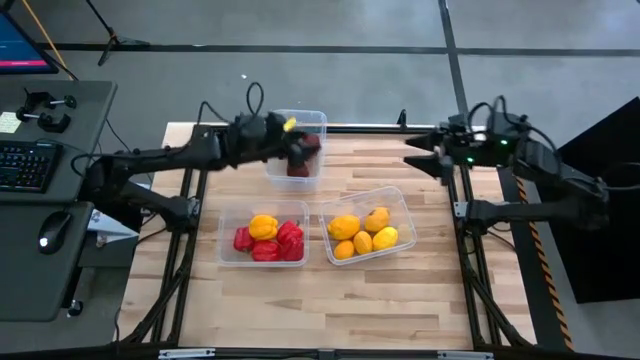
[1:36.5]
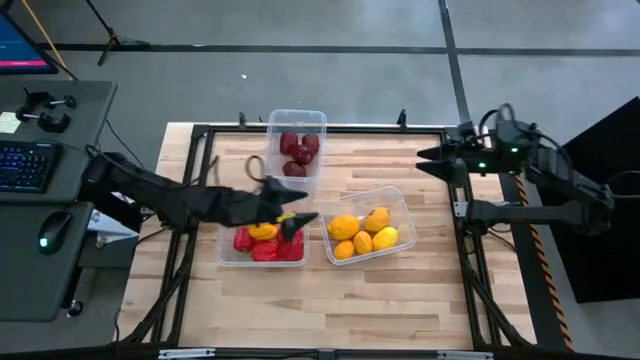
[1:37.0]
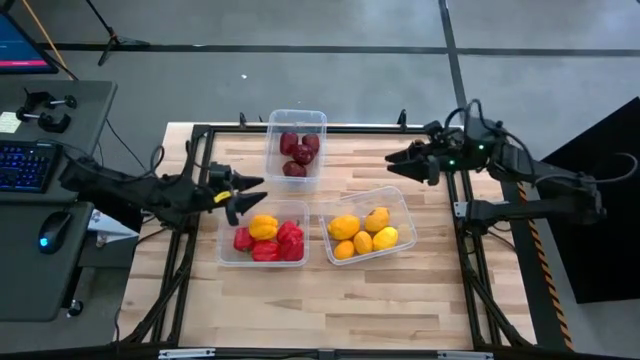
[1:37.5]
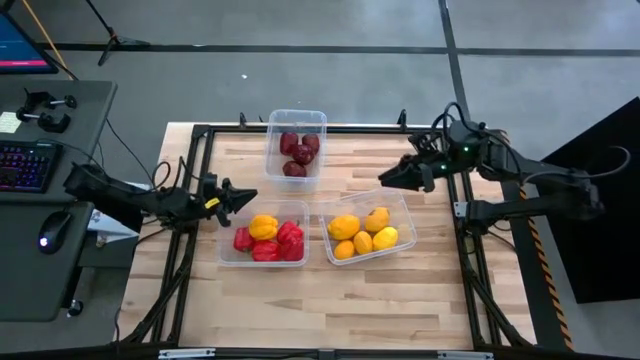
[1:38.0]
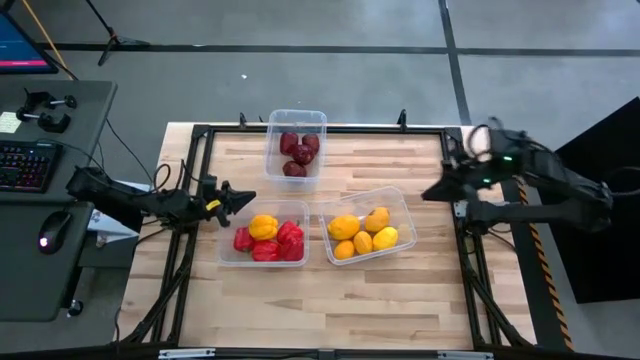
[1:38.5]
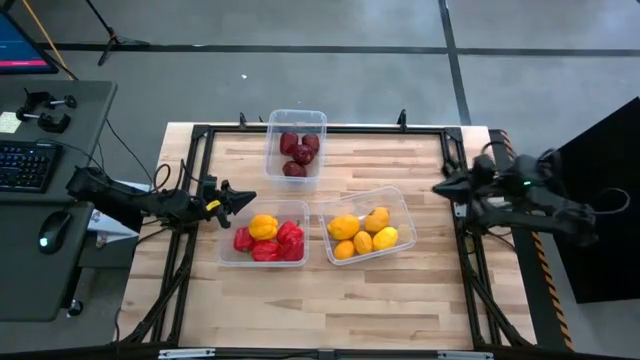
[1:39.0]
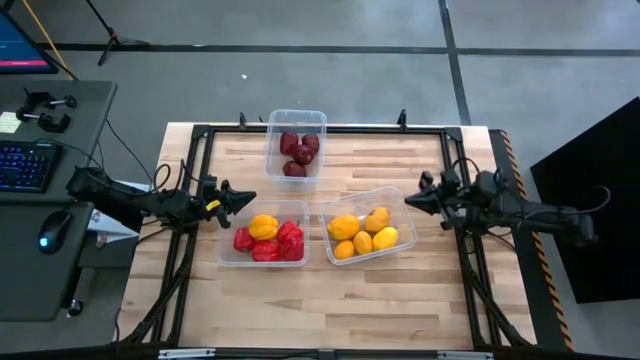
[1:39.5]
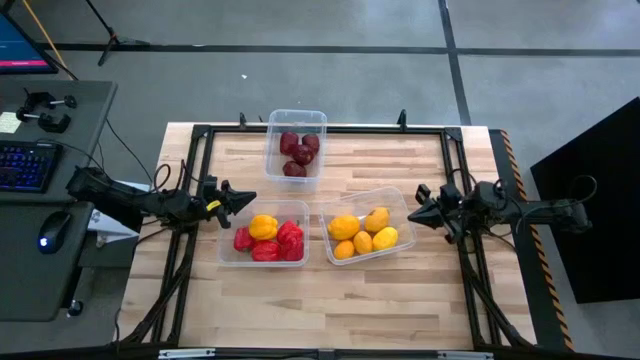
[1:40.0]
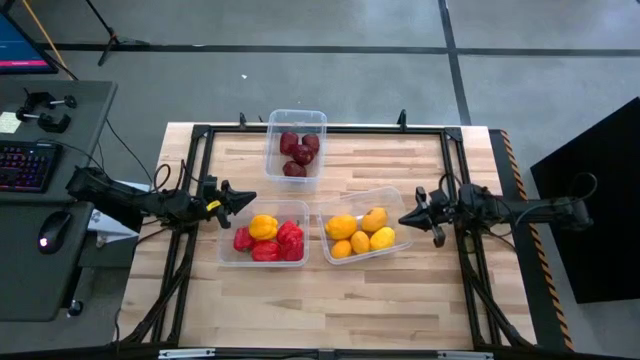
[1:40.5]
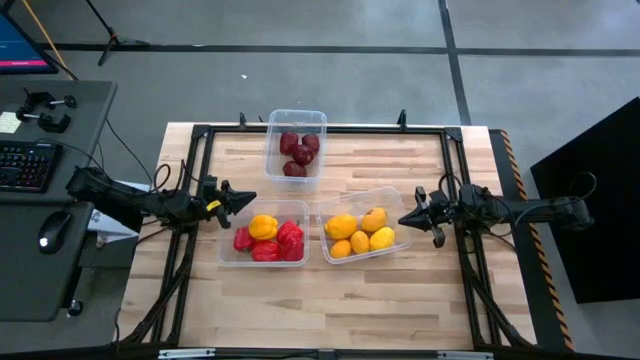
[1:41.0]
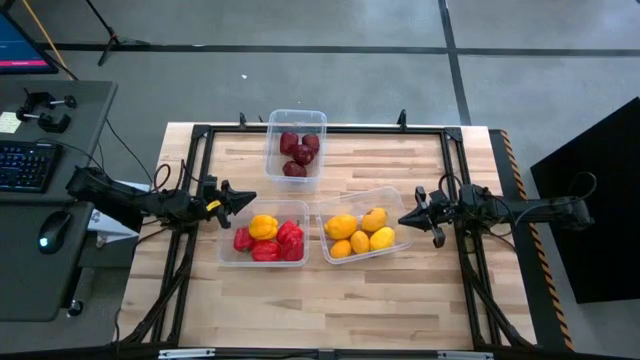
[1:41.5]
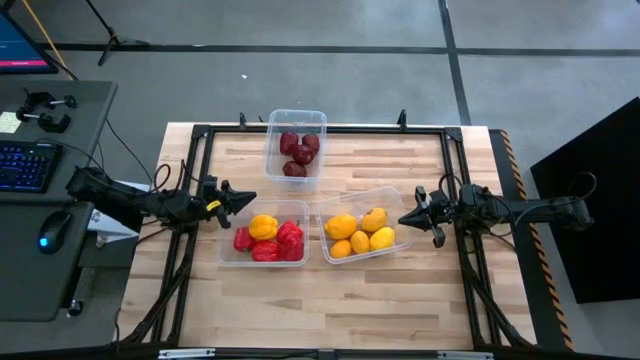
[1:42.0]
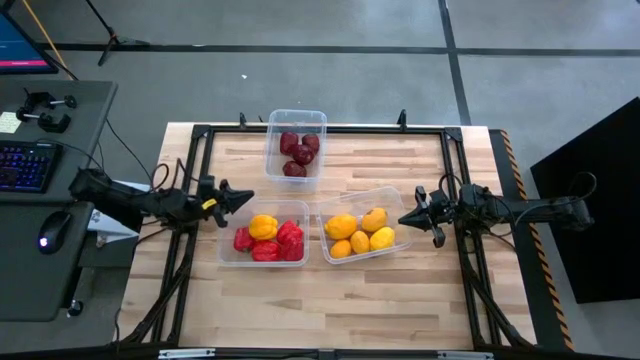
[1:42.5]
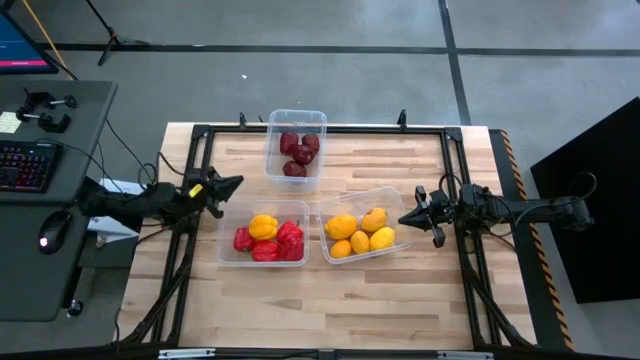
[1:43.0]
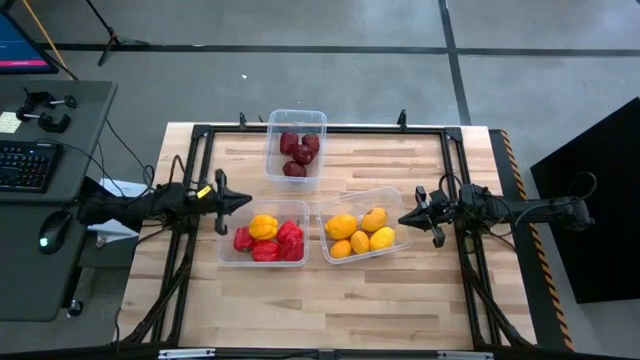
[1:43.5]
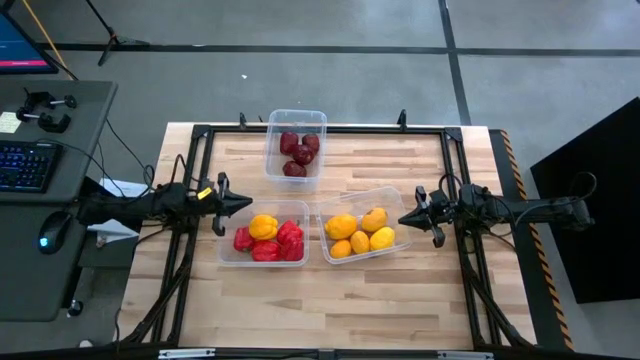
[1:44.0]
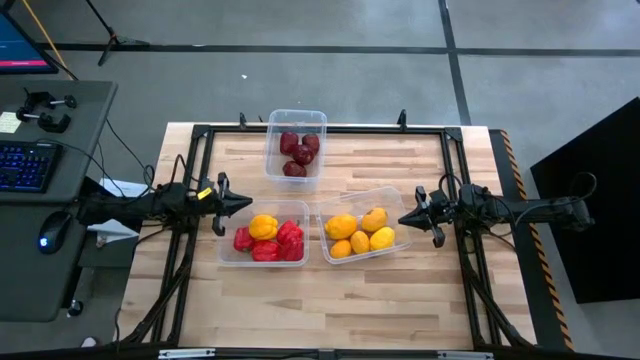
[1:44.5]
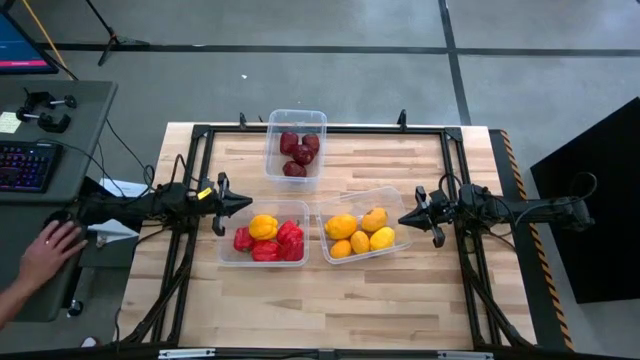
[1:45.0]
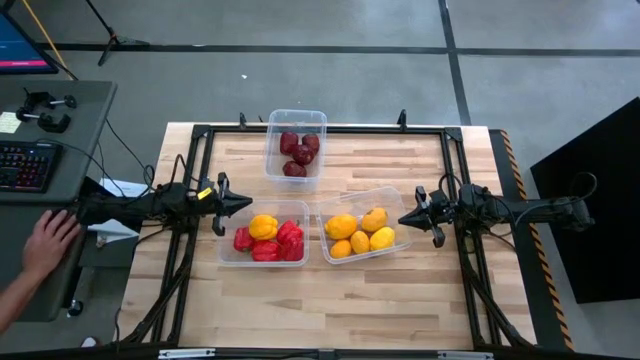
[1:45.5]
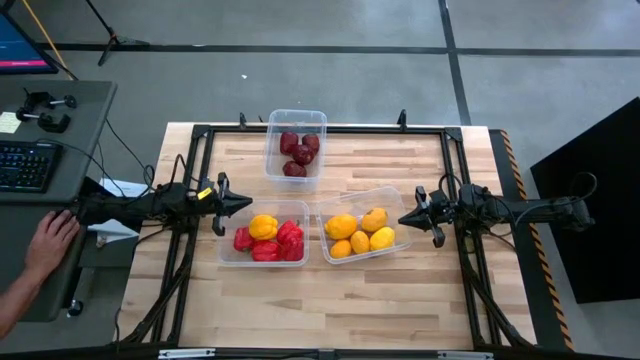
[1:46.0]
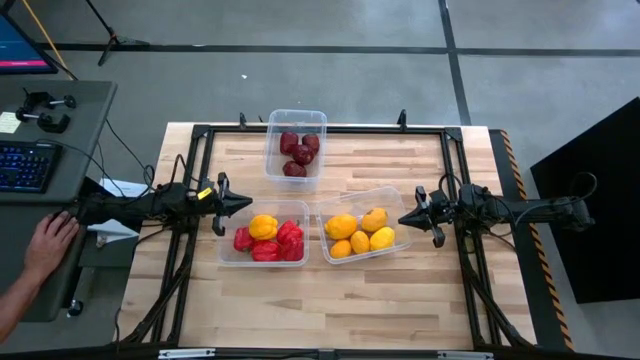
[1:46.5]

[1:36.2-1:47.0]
Task: Sort produce into baskets
Return to Home Position

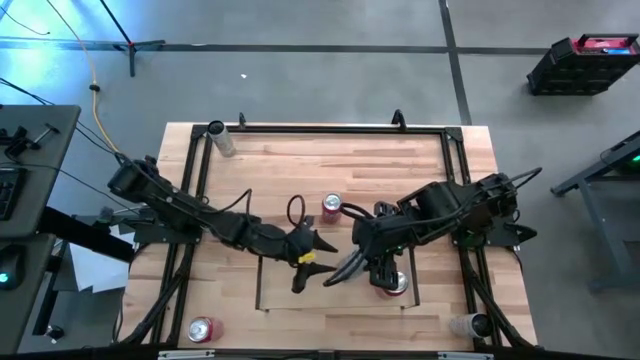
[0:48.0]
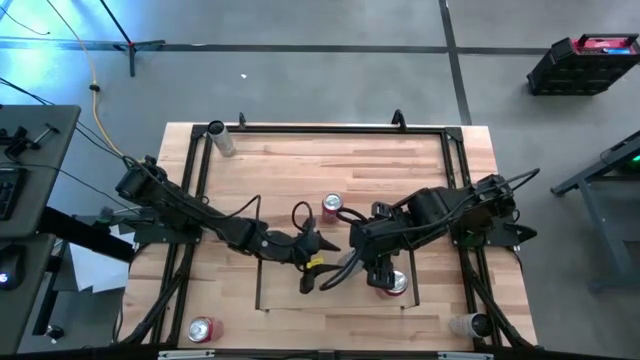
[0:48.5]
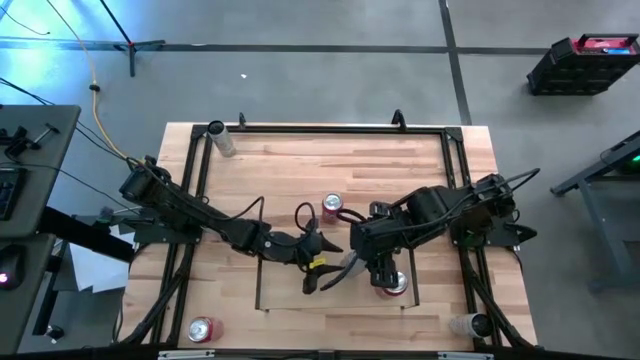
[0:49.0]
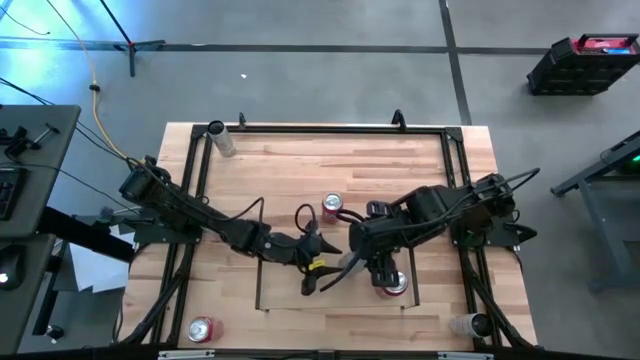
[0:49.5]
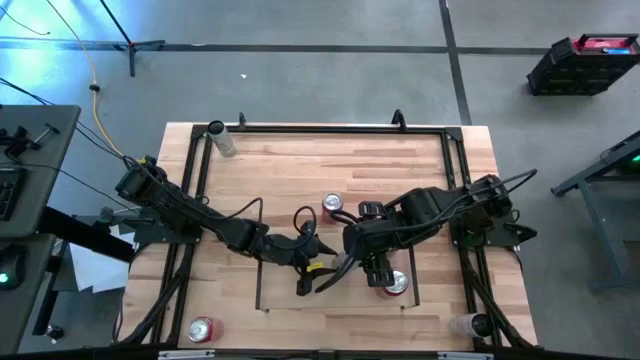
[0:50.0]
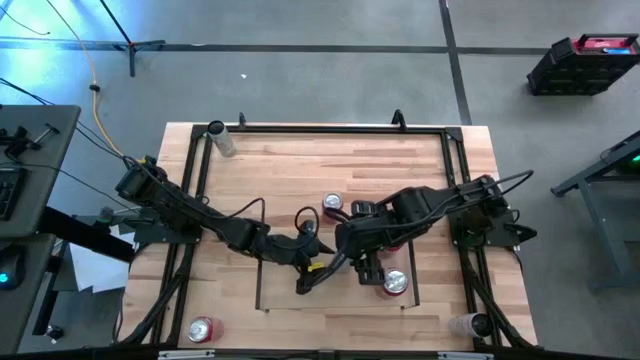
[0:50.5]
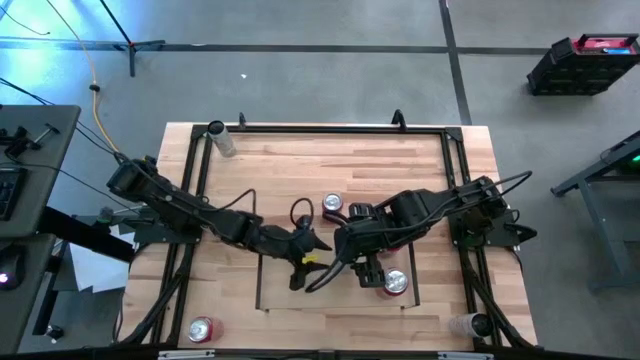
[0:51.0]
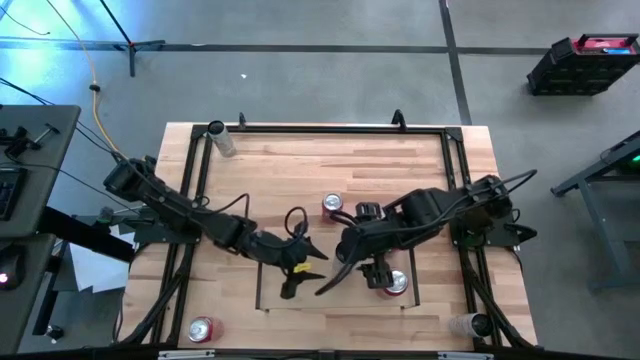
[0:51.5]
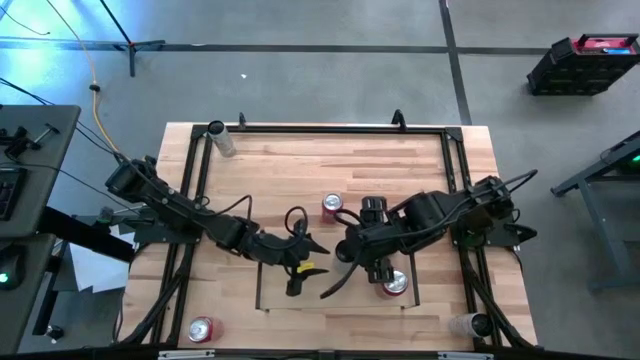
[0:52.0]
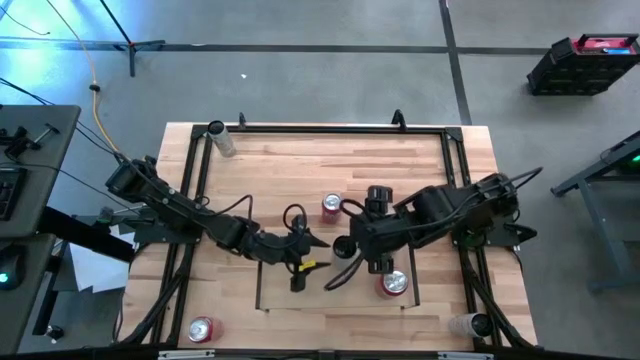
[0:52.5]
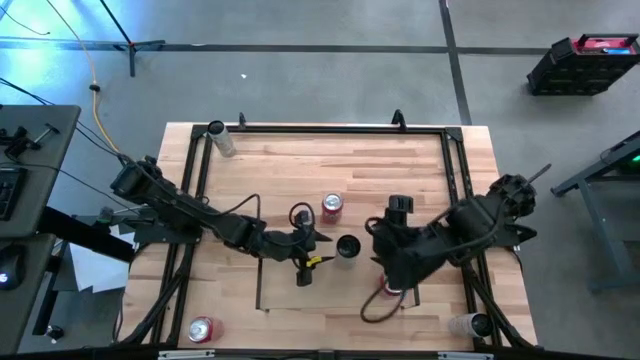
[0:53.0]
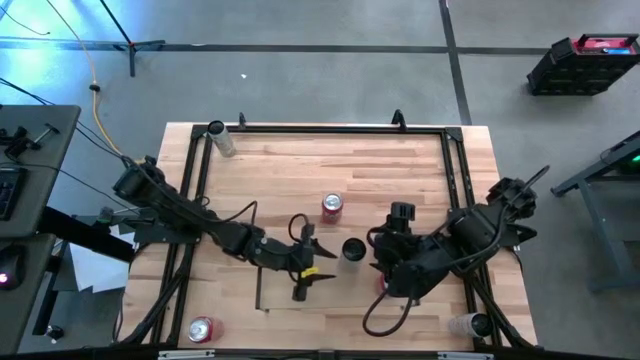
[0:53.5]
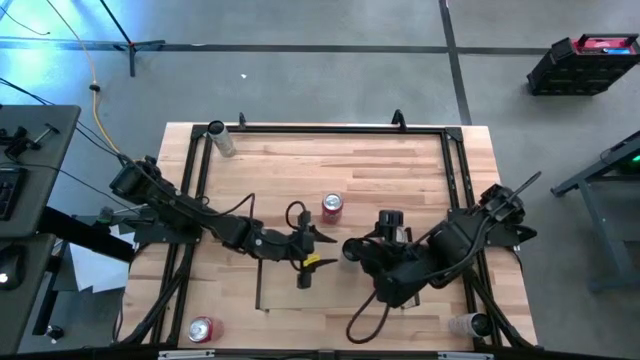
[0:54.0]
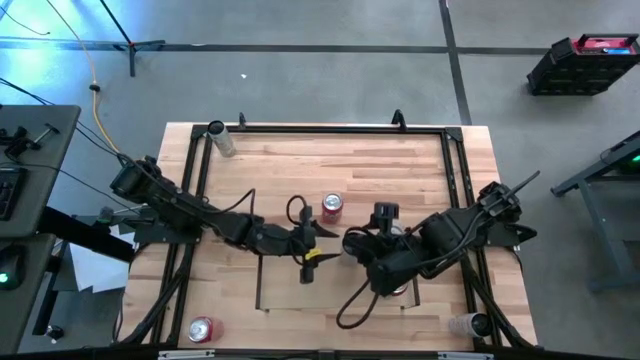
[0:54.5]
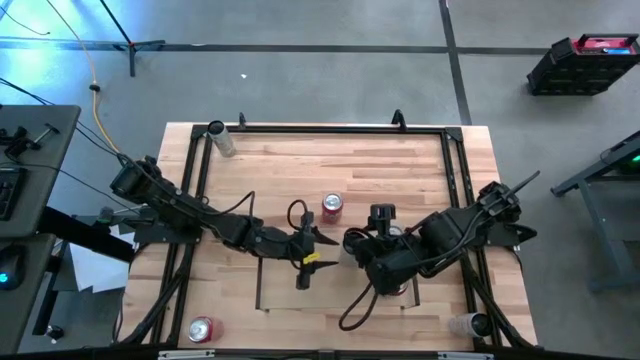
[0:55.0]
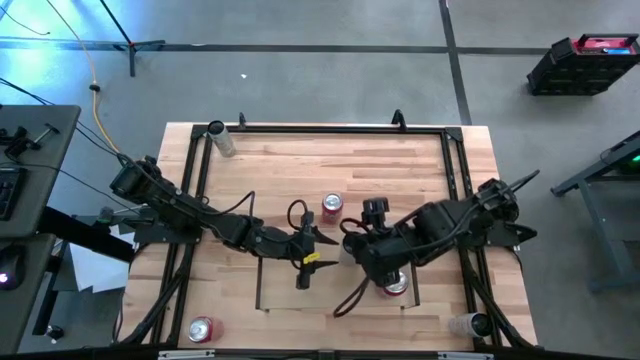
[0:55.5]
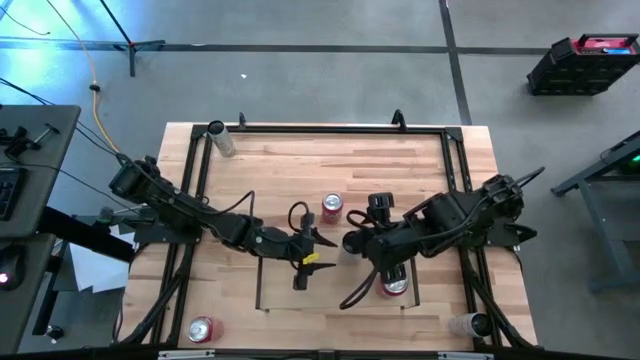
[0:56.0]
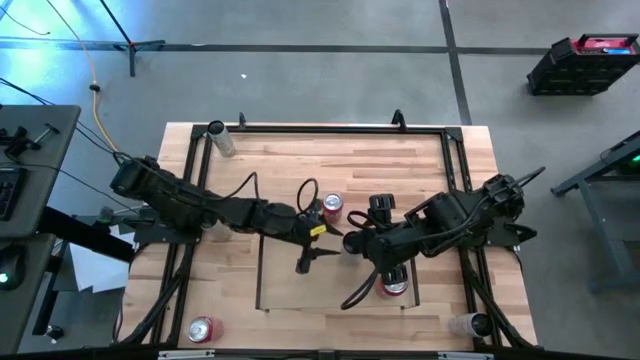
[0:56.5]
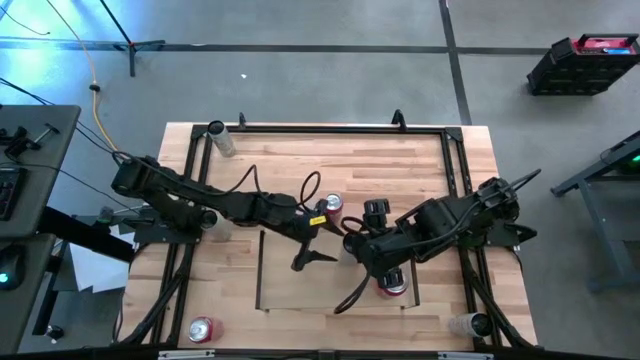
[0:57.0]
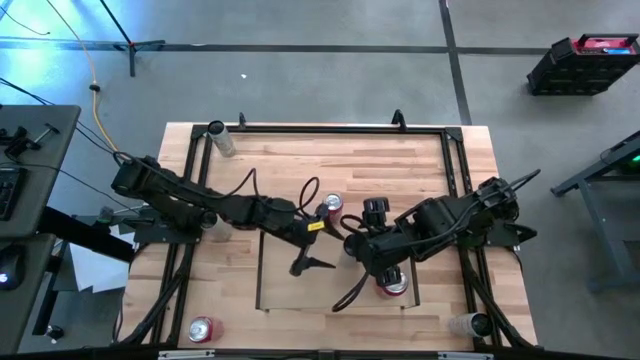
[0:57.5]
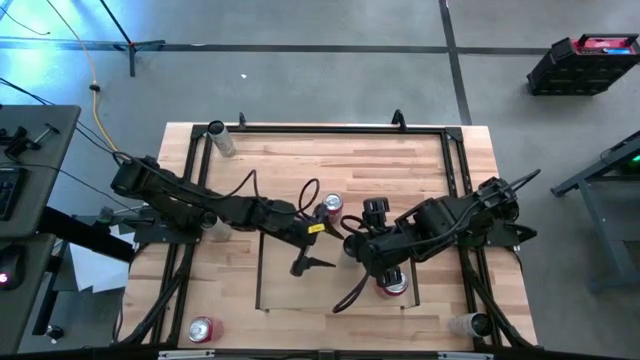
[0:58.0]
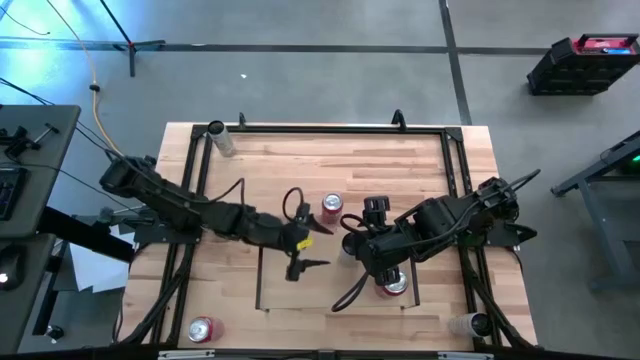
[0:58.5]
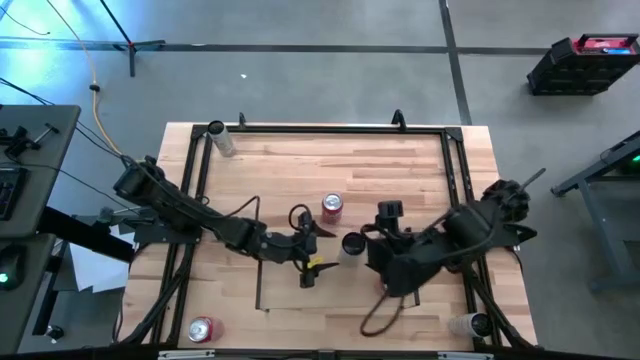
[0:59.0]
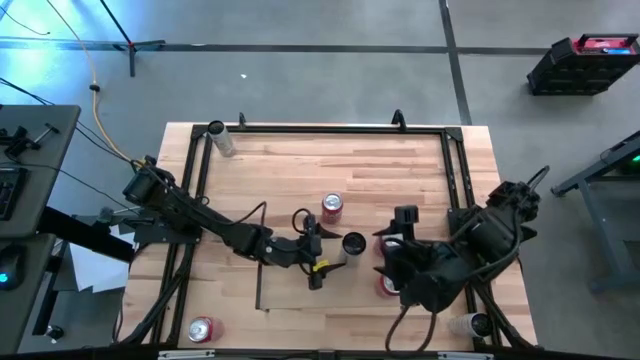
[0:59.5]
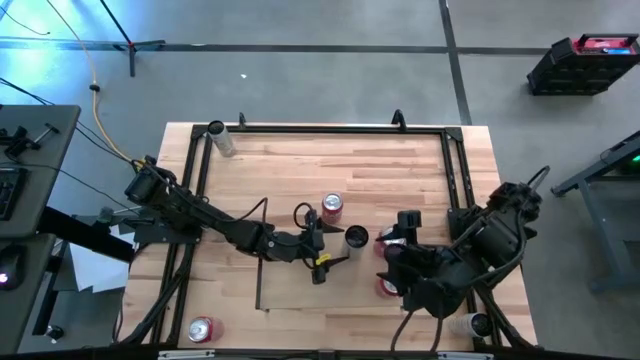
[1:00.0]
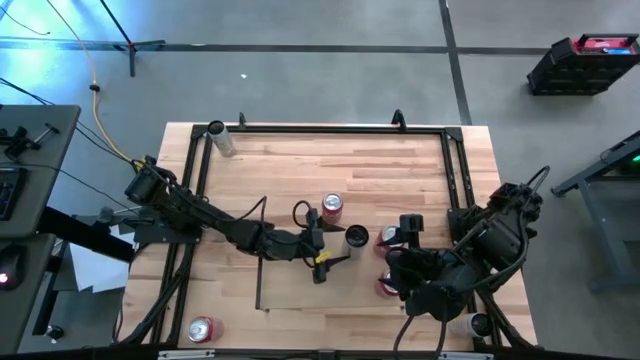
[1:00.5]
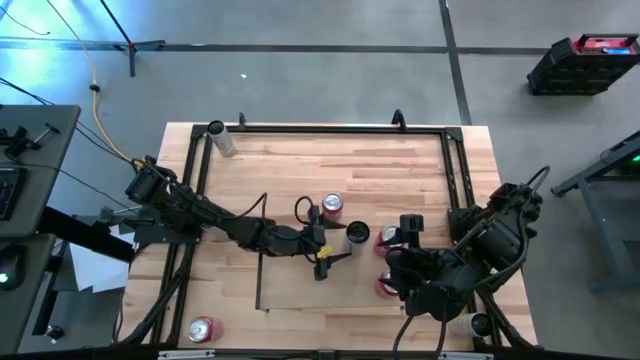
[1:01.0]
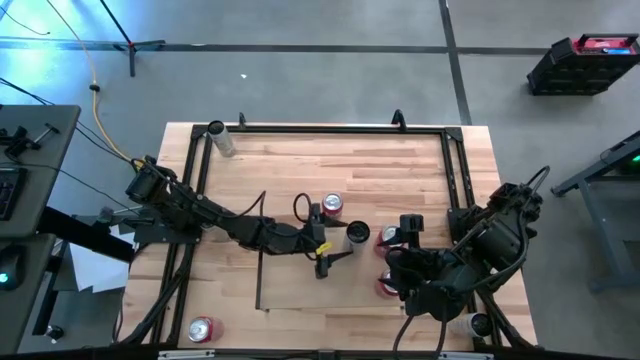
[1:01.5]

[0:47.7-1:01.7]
Task: Place canned beverage on shelf
Put the middle right white yellow soda can on the shelf
